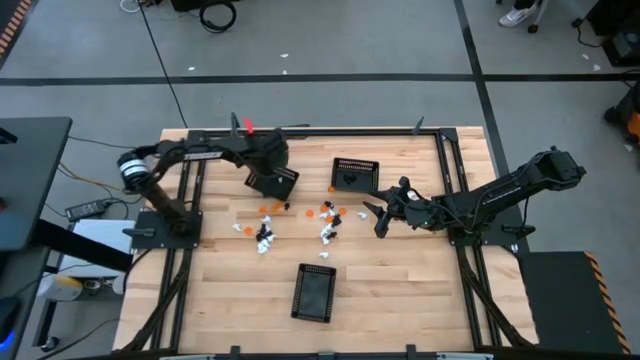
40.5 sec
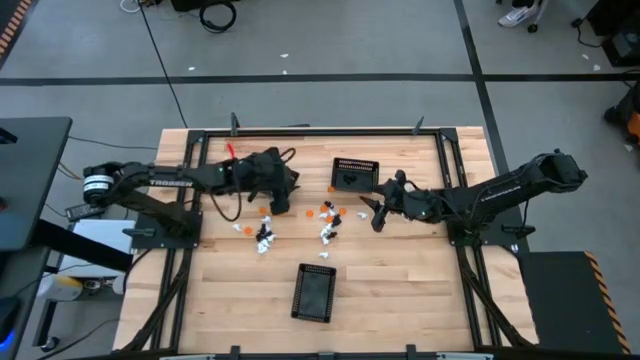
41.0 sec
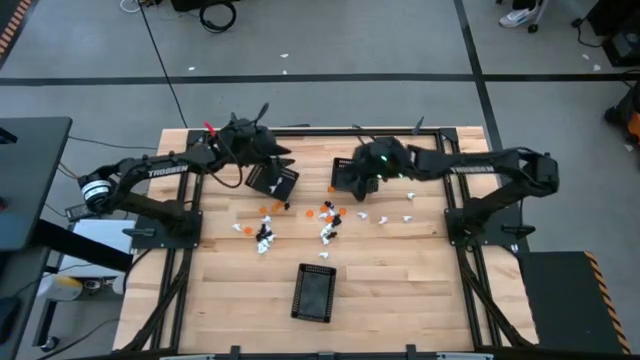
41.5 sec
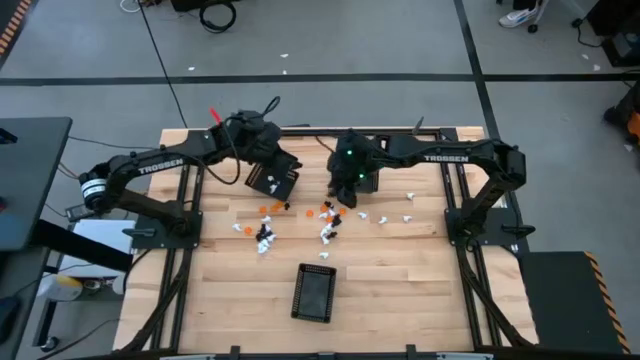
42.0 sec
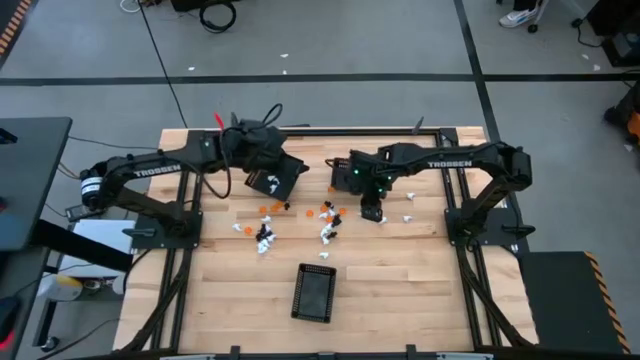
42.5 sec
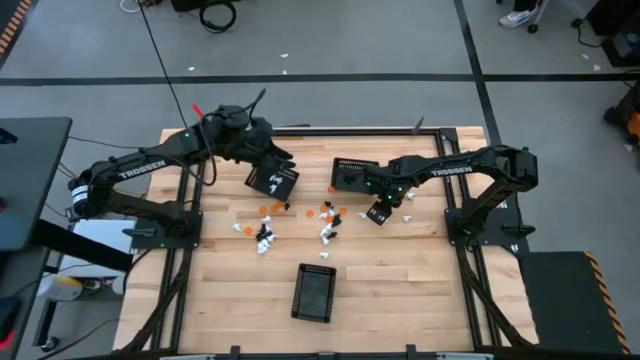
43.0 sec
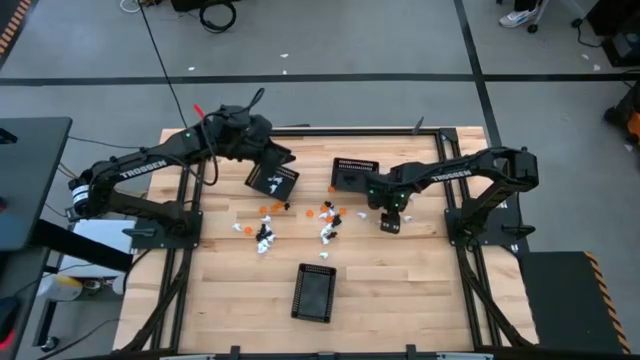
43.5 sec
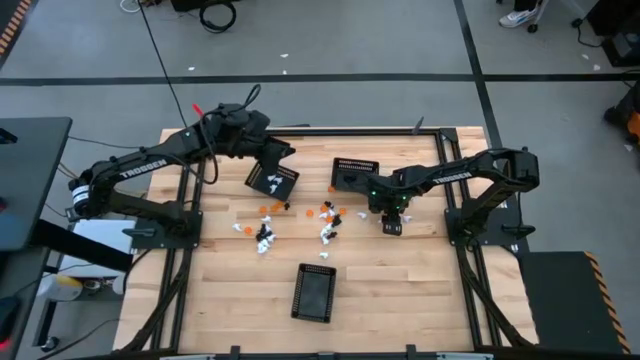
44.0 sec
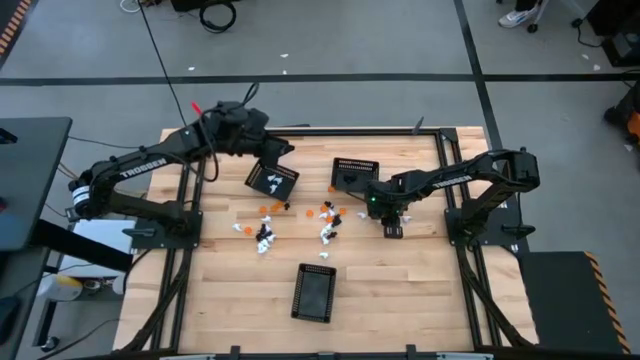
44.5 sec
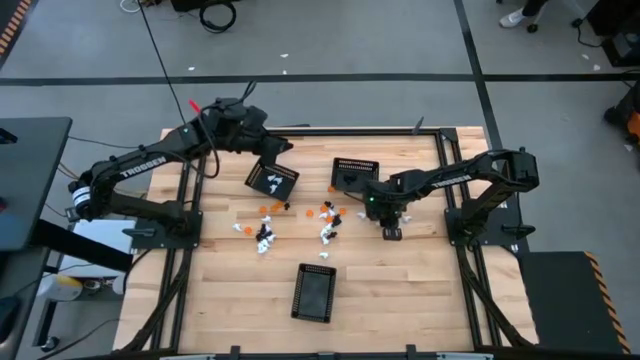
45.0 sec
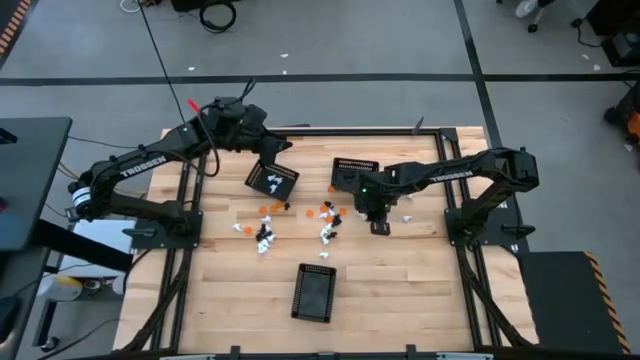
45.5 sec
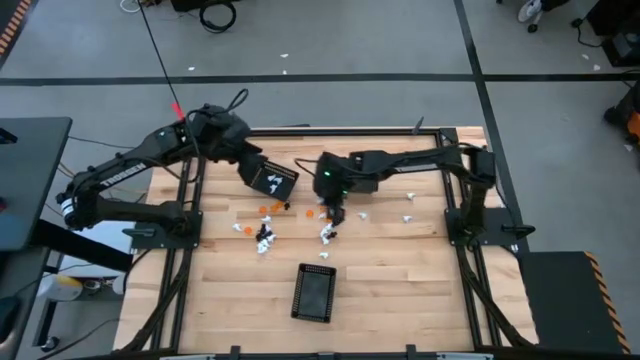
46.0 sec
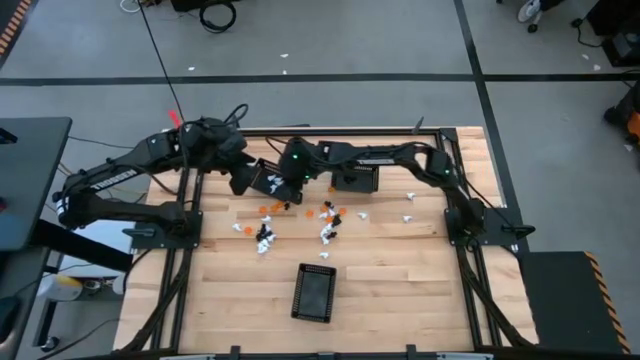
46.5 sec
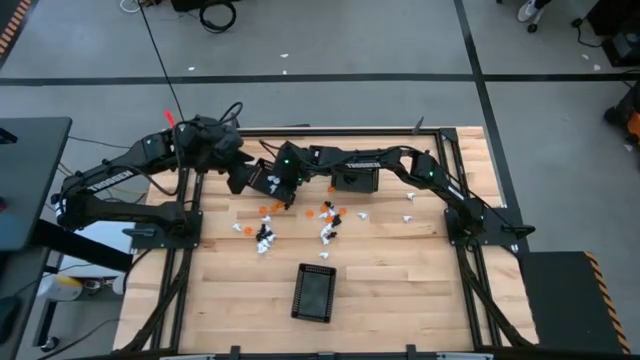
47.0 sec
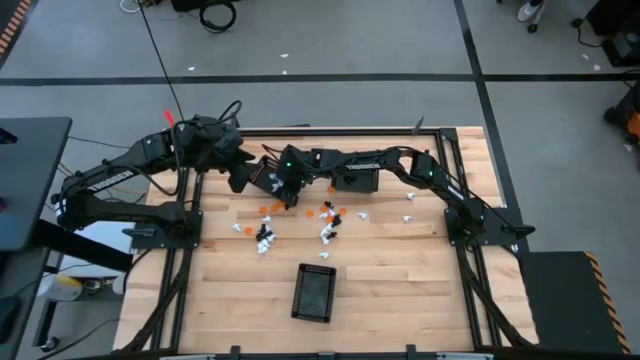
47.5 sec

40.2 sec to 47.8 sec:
Task: Sort Halloween decoration
Put the white ghost toy into the top left black basket

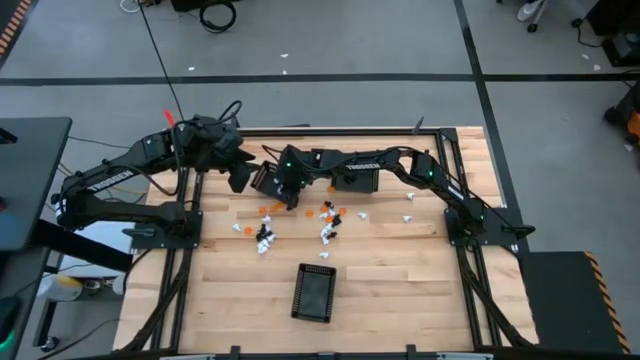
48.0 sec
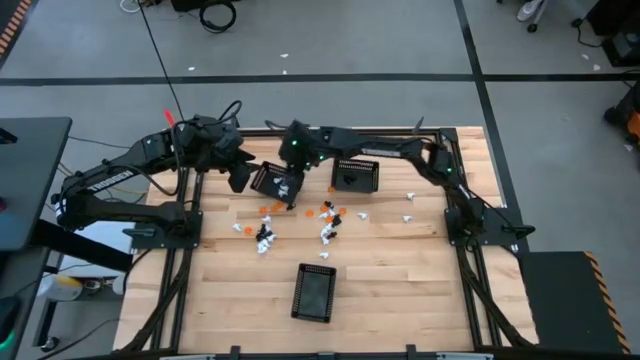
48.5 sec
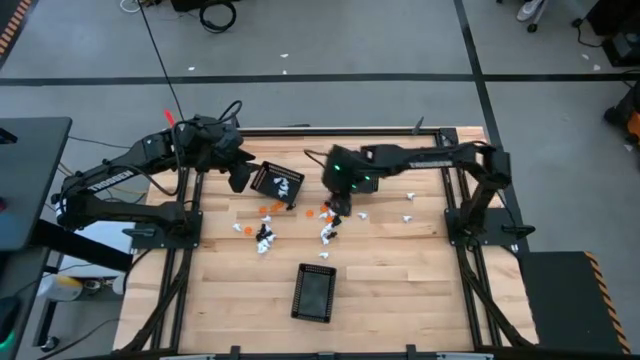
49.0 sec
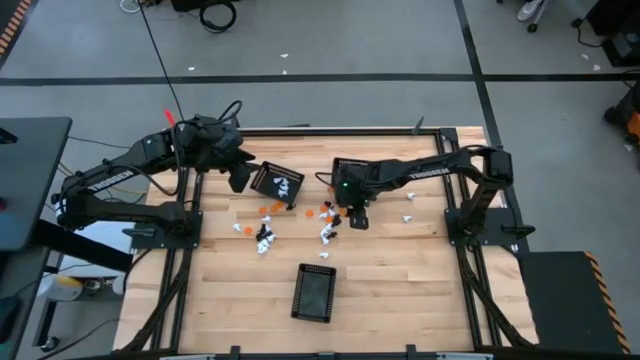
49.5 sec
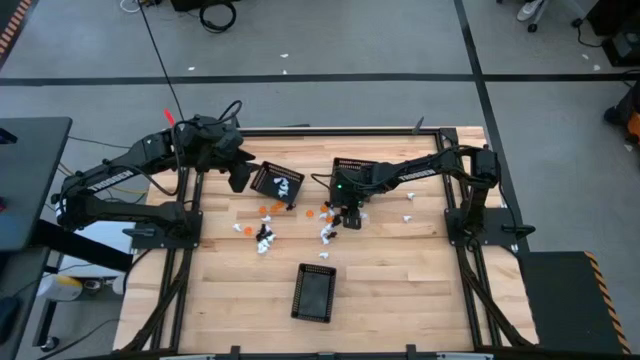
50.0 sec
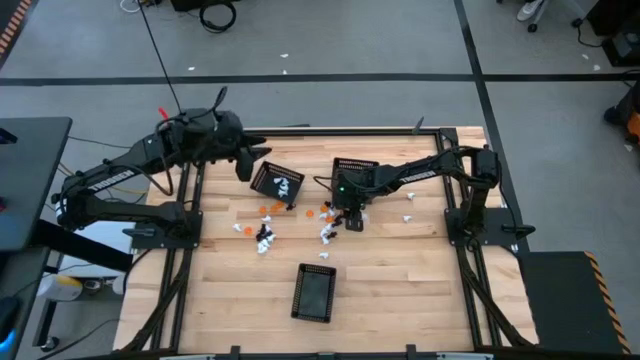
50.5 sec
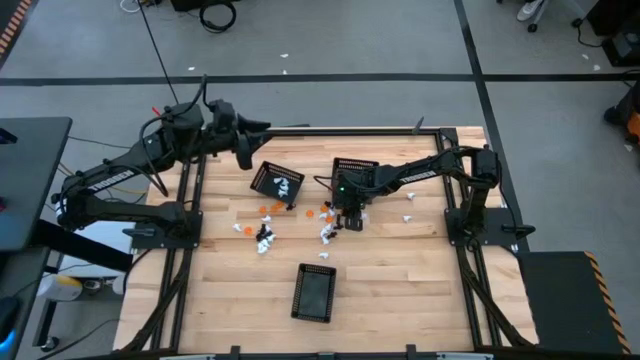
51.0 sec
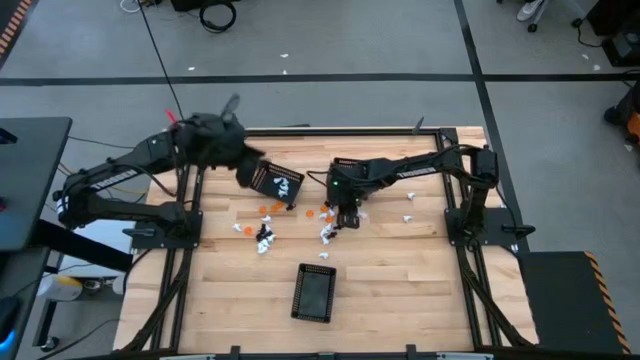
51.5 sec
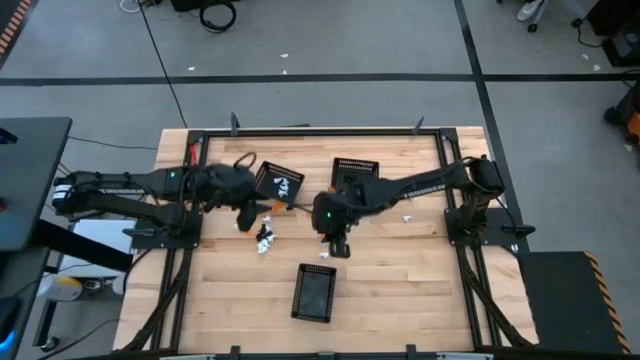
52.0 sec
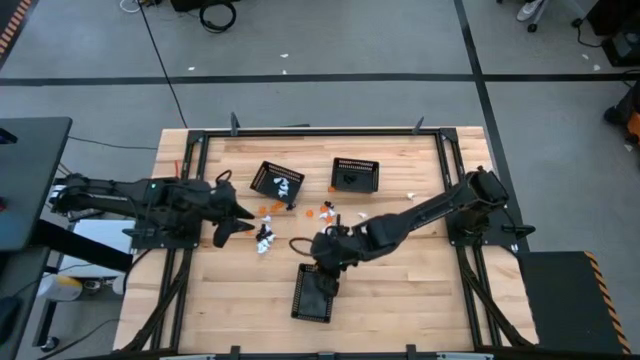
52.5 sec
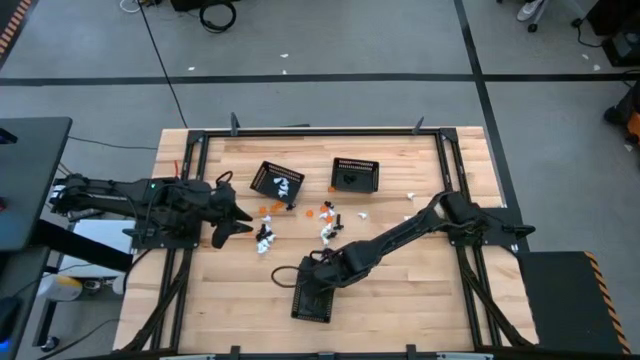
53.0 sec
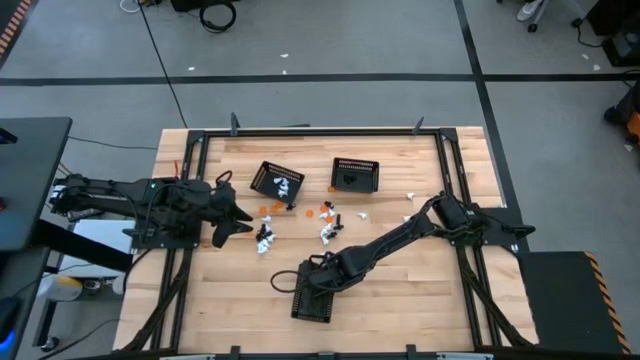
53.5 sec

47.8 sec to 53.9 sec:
Put the orange pumpkin toy into the bottom black basket

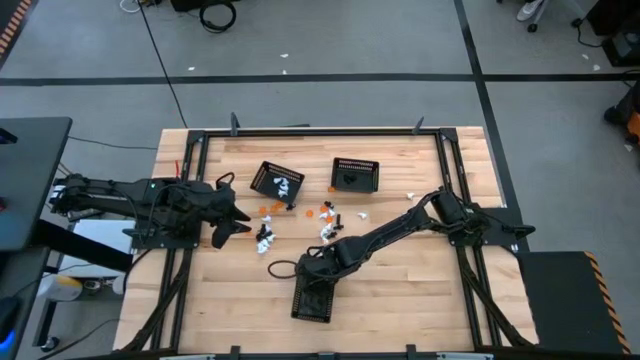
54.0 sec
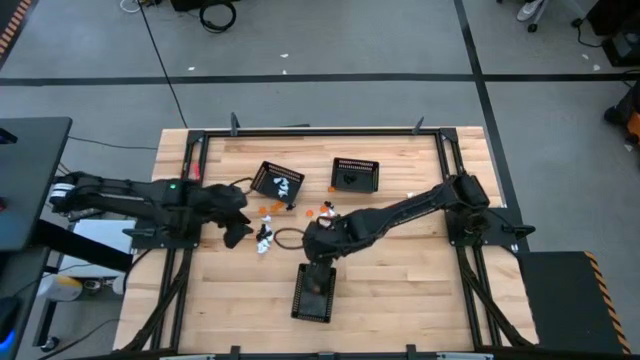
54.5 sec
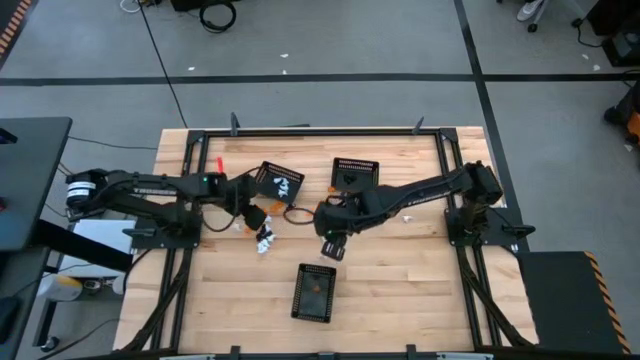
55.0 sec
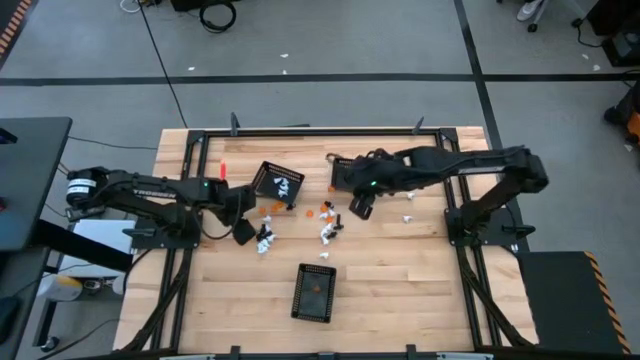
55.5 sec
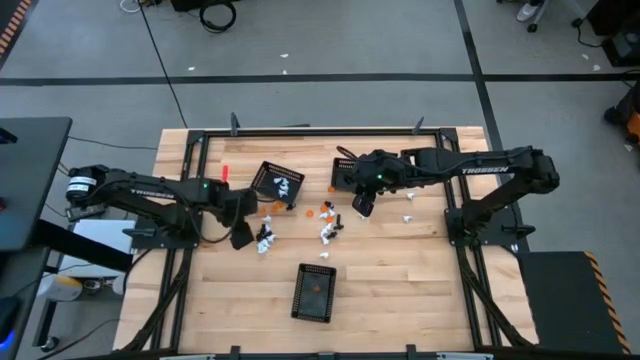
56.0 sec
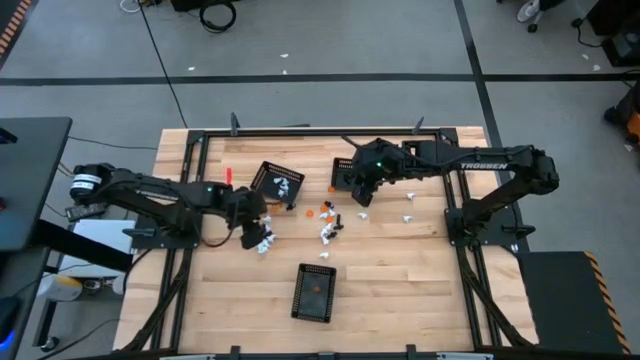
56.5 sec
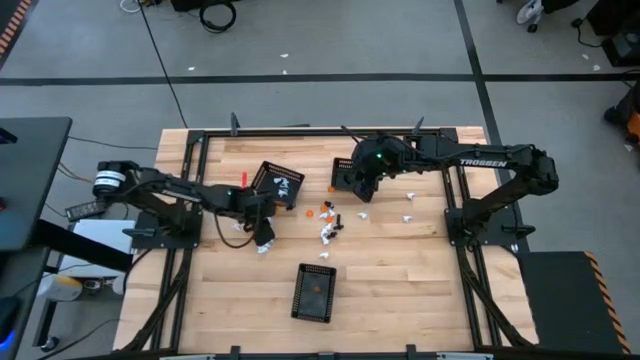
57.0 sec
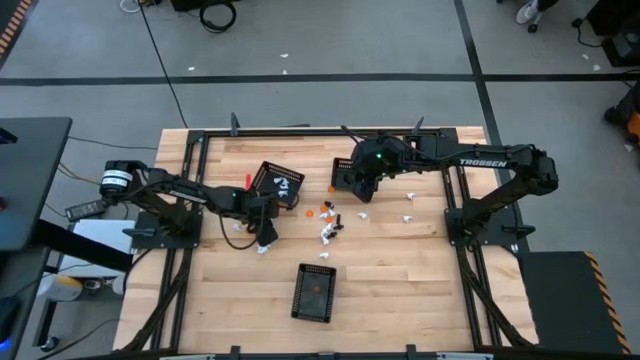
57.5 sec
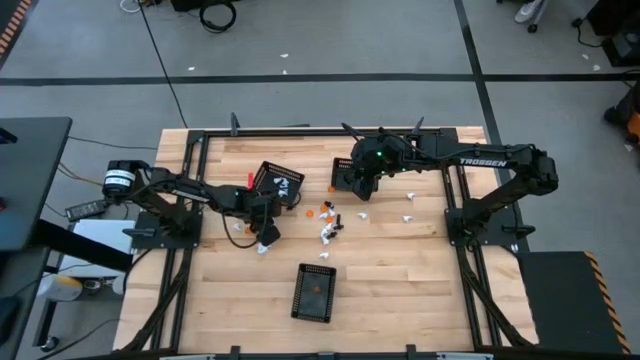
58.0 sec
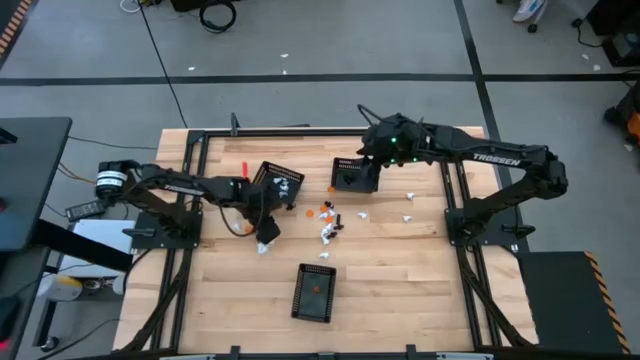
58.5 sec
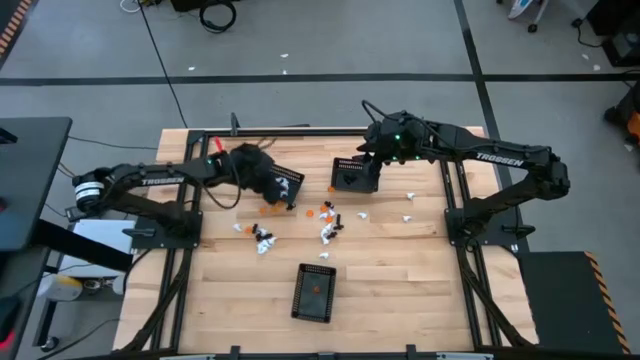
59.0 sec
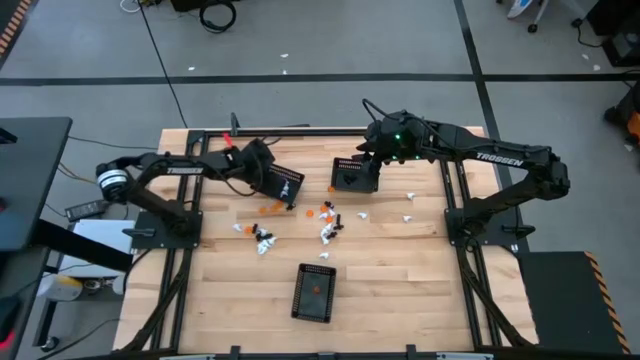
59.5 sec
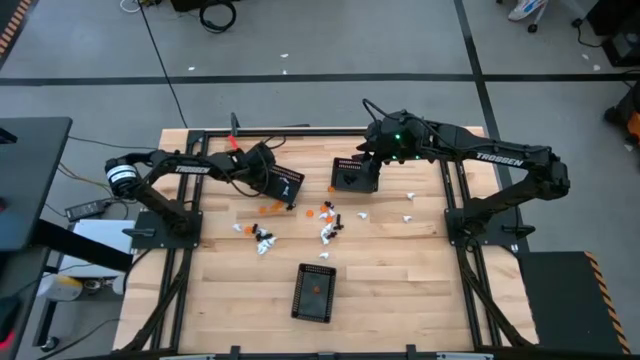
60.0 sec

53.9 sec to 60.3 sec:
Put the white ghost toy into the top left black basket

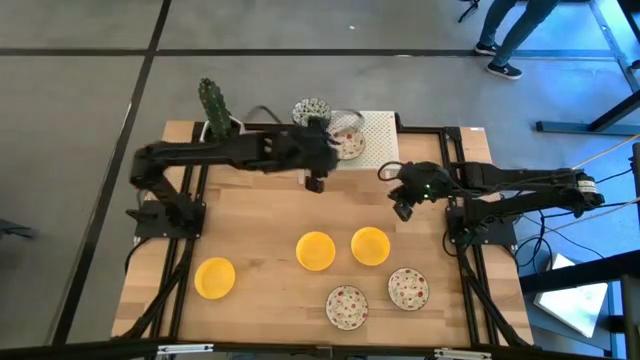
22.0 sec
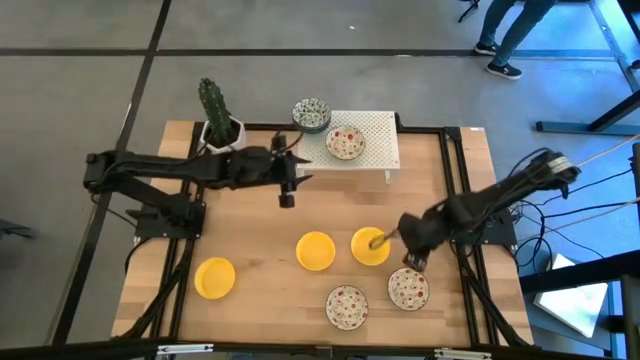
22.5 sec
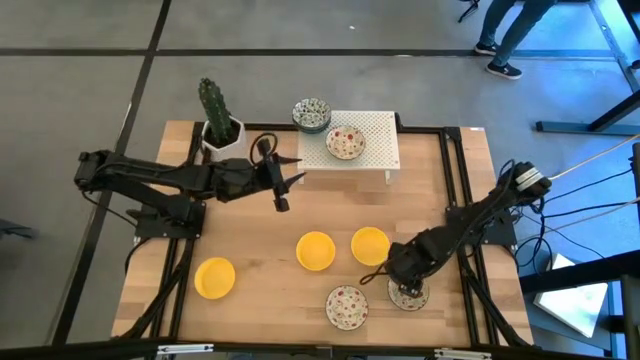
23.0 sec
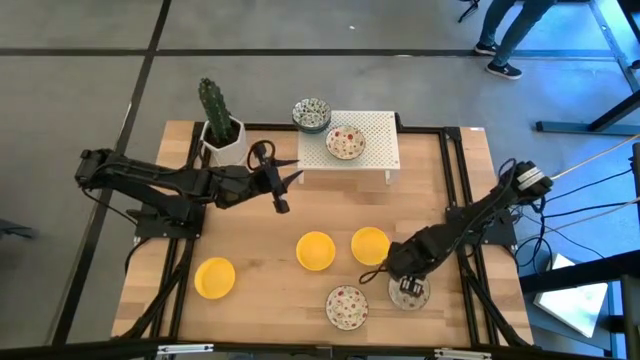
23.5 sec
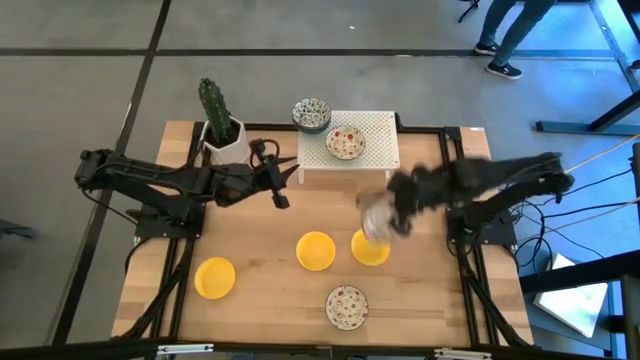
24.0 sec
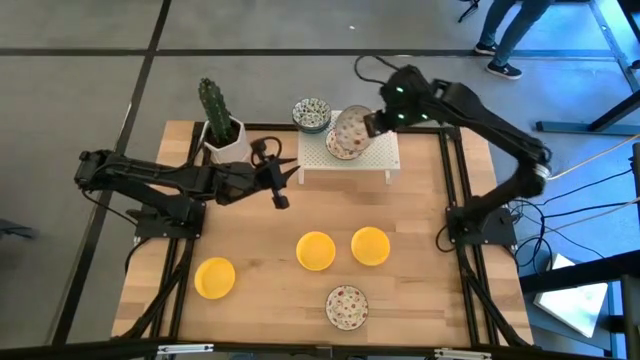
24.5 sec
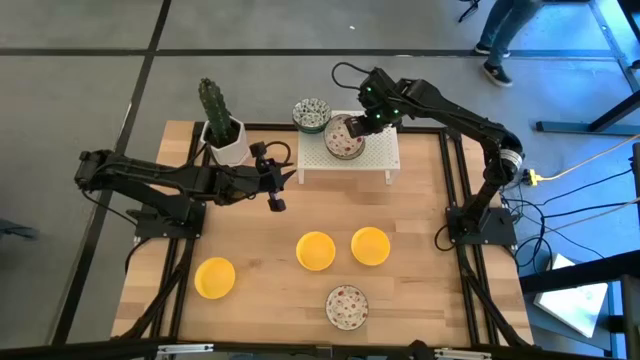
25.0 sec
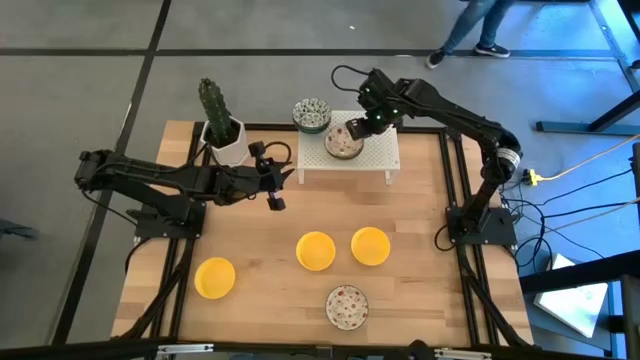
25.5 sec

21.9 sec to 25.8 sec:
Task: Pick & Place Mini bowls
Stack the right red white bowl on top of the red white bowl on the shelf
